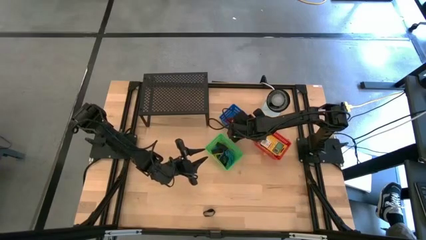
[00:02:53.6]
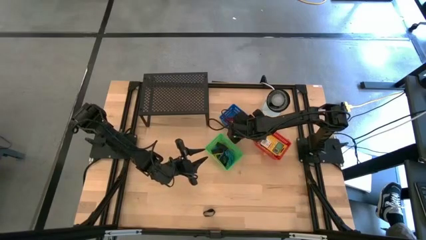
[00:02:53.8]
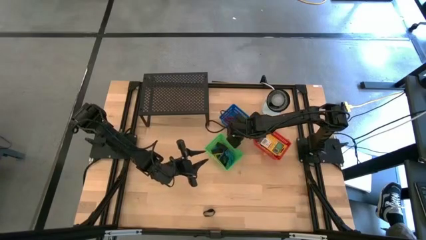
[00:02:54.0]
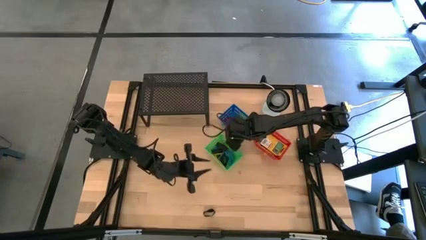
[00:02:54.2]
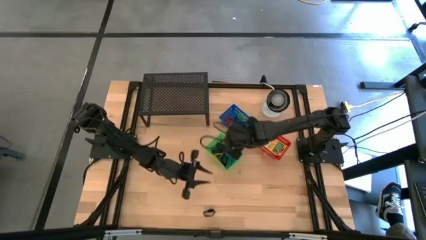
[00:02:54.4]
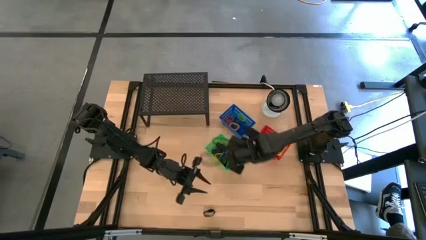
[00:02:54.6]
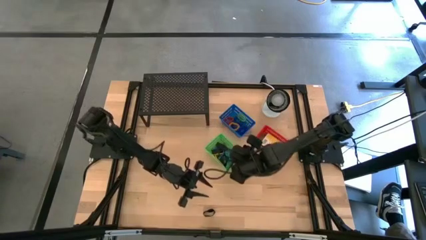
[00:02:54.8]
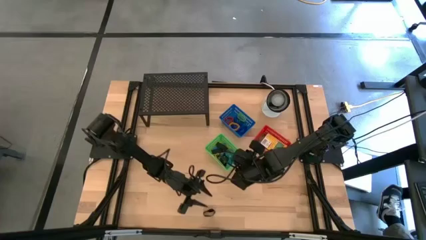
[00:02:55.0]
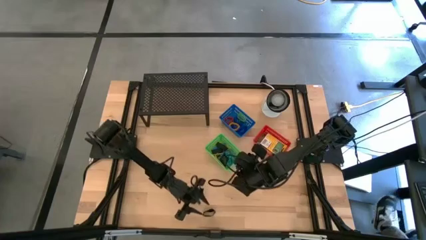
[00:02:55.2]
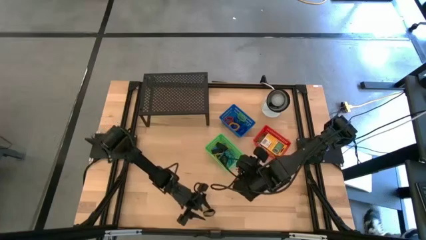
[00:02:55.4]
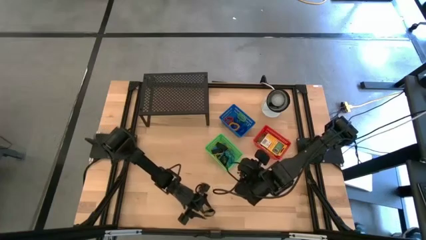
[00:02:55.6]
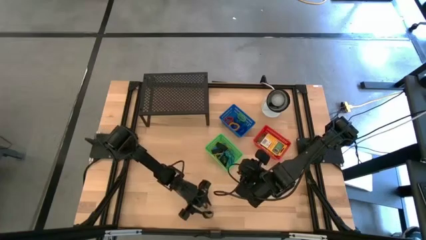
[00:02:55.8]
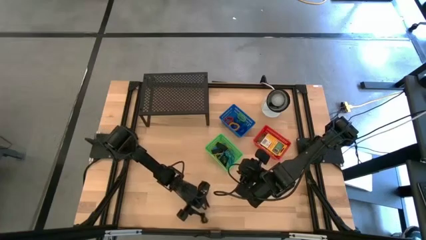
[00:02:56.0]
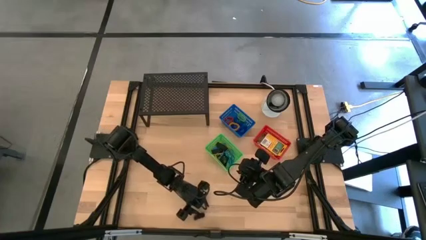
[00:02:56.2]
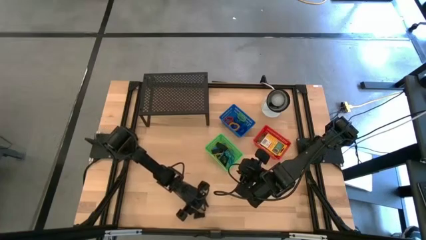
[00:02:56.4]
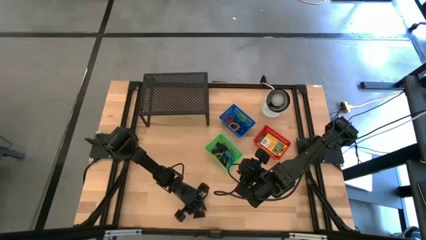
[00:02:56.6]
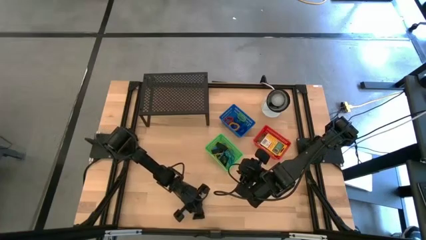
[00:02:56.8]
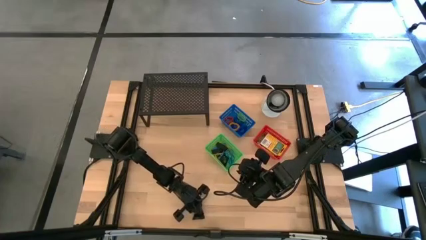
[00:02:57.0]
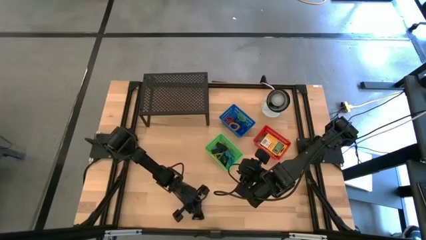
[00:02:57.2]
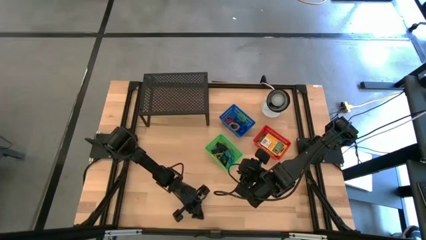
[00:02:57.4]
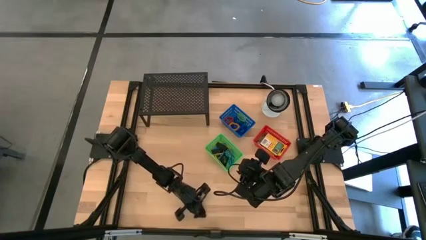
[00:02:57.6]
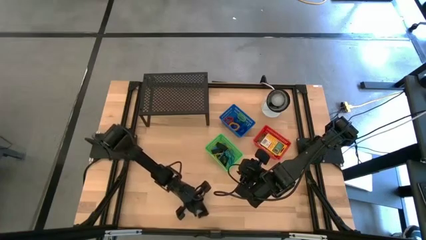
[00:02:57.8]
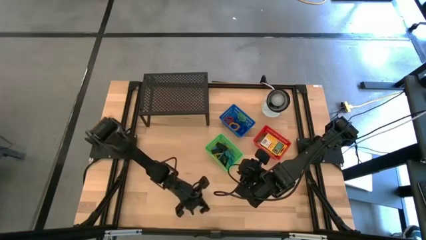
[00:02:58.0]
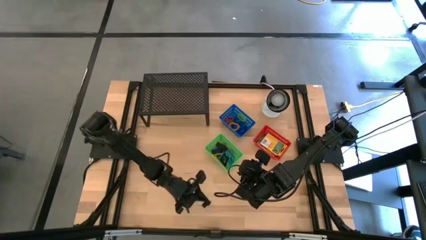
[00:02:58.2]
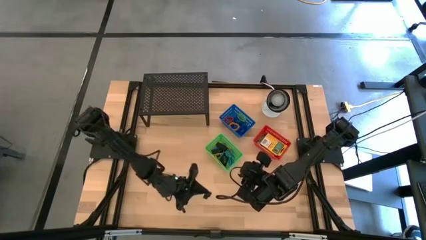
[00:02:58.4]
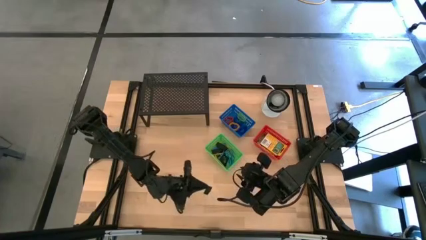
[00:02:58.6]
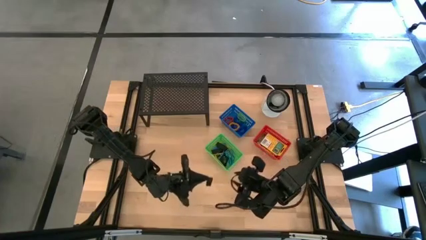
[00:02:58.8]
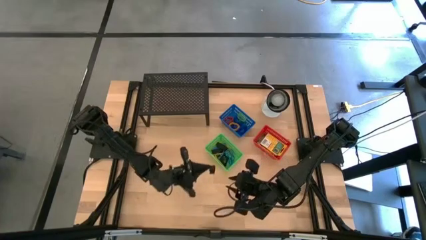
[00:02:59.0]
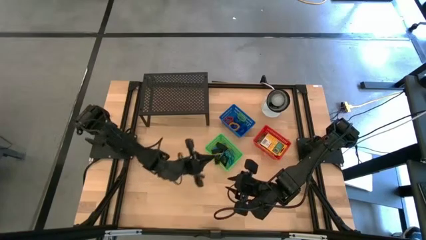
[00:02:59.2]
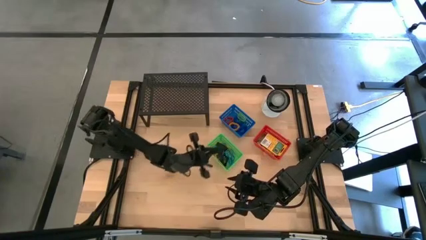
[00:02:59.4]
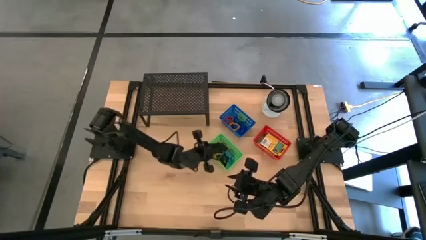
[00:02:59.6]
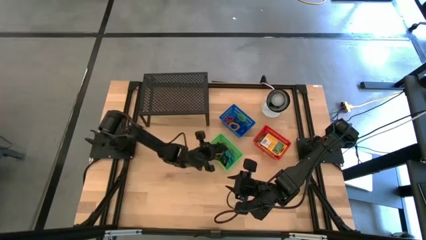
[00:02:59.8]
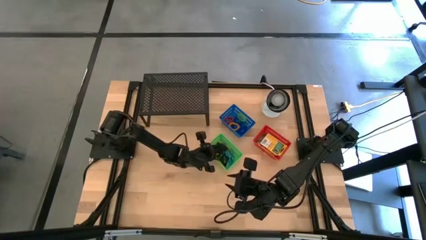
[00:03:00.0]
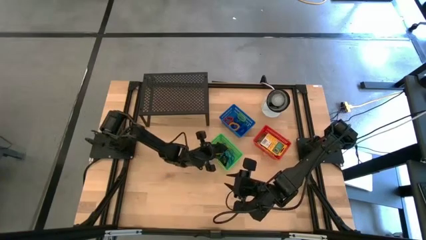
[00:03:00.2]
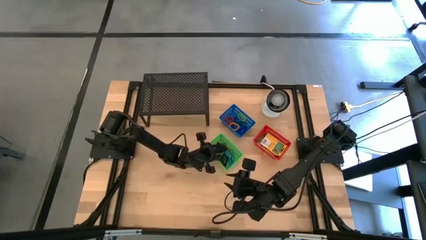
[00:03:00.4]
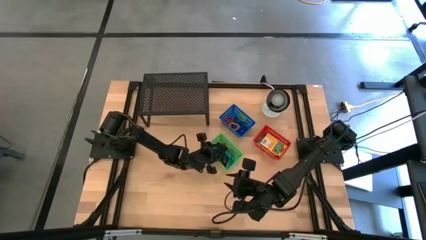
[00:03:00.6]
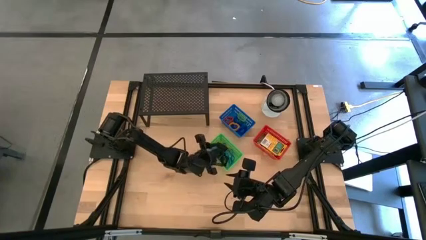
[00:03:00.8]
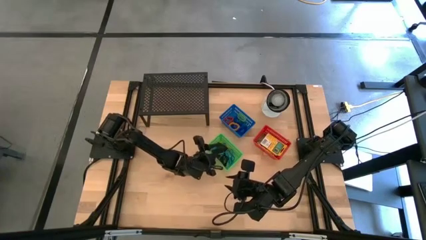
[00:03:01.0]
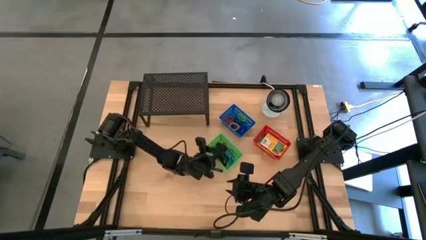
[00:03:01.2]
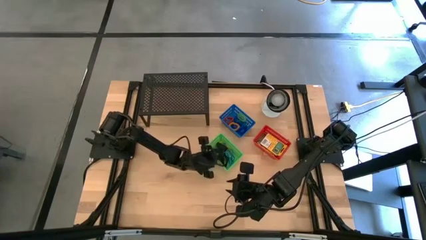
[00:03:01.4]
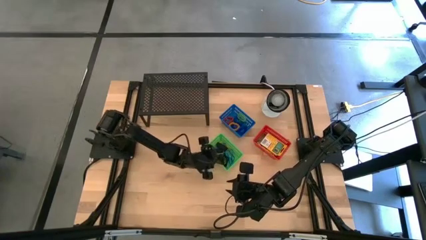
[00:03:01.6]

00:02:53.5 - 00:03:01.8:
Task: Pick & Place Office Desk Supplies
Put the black rubber band into the green basket

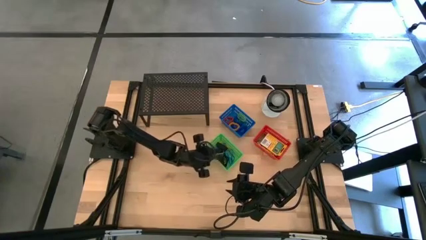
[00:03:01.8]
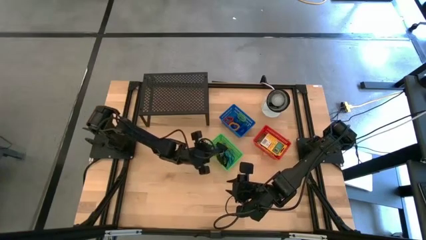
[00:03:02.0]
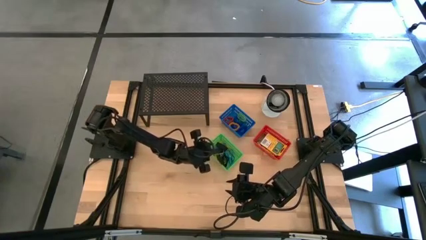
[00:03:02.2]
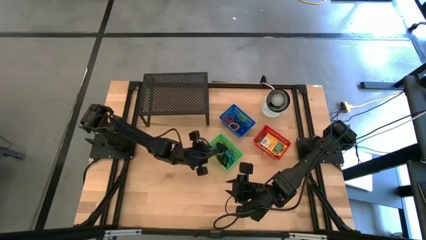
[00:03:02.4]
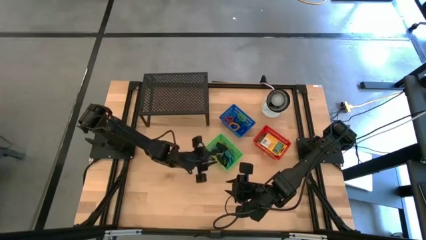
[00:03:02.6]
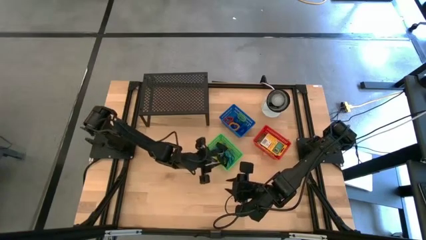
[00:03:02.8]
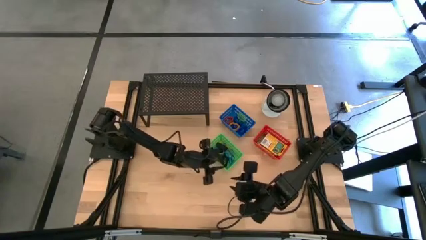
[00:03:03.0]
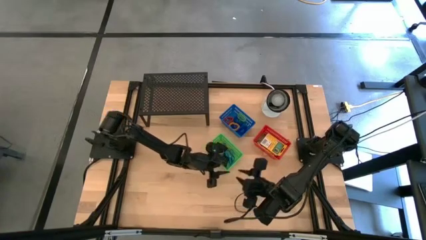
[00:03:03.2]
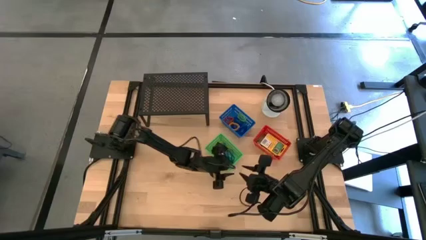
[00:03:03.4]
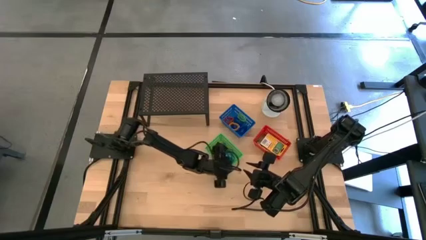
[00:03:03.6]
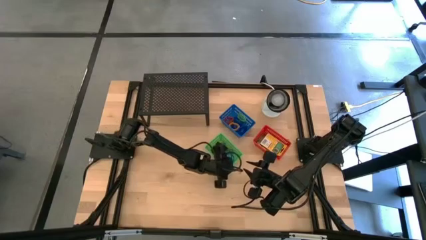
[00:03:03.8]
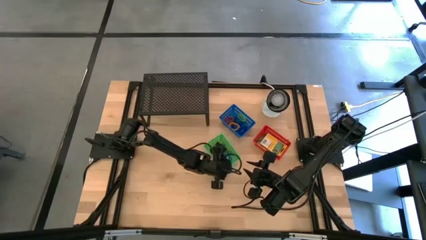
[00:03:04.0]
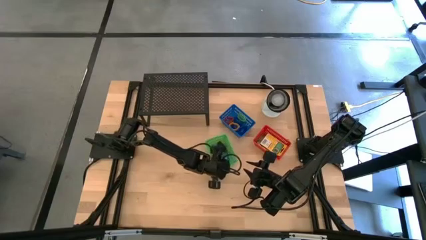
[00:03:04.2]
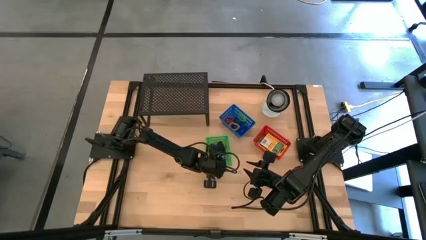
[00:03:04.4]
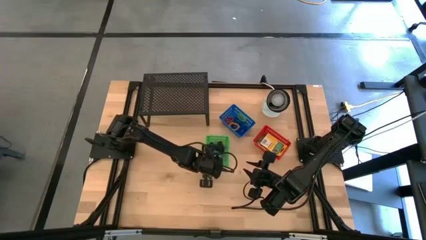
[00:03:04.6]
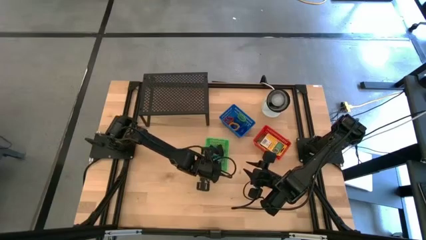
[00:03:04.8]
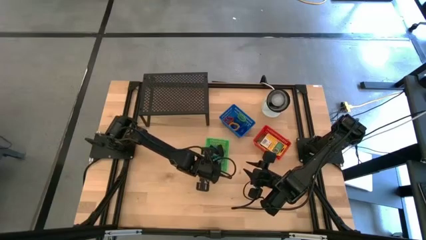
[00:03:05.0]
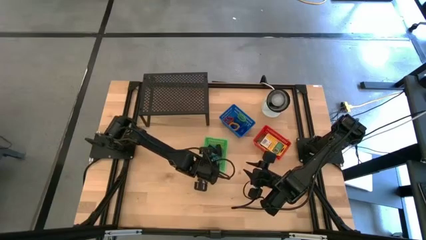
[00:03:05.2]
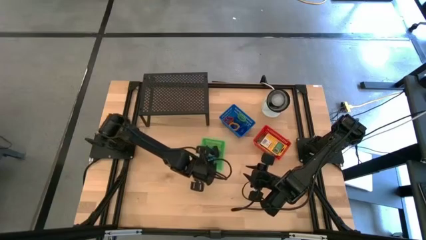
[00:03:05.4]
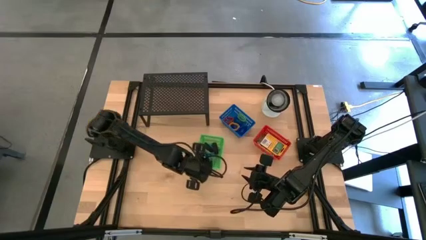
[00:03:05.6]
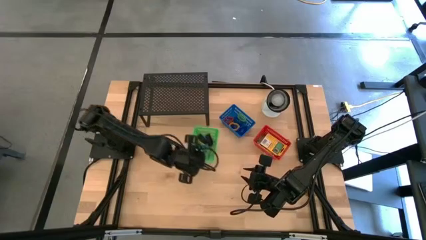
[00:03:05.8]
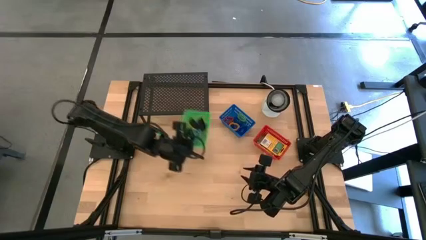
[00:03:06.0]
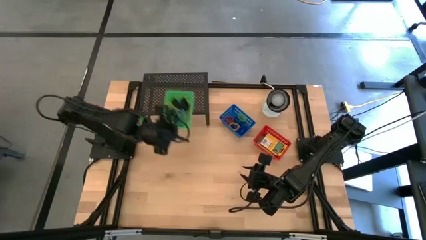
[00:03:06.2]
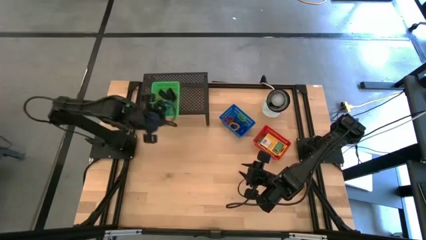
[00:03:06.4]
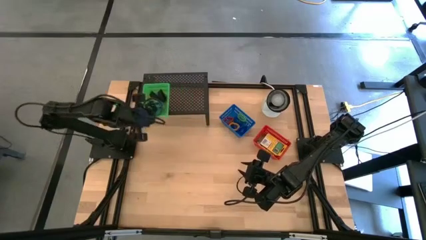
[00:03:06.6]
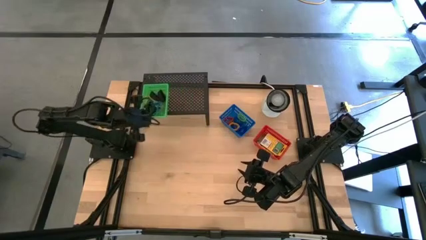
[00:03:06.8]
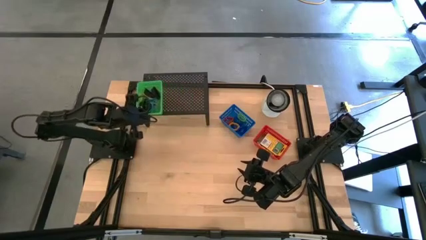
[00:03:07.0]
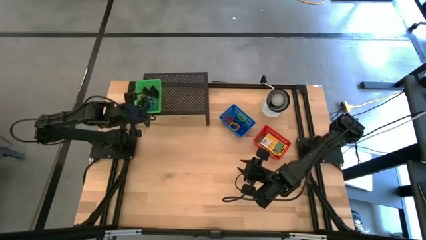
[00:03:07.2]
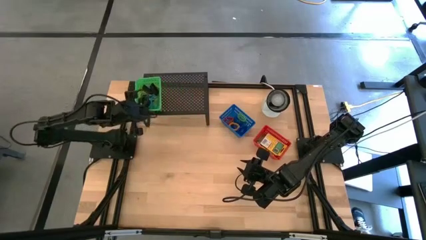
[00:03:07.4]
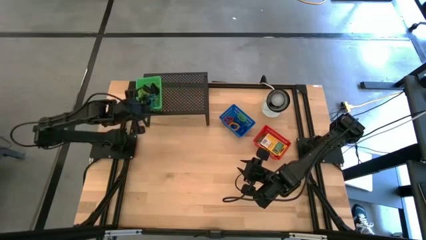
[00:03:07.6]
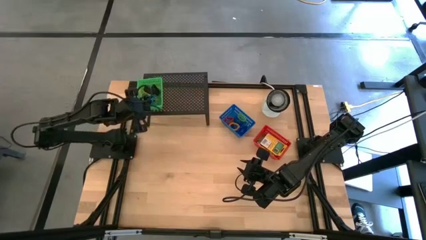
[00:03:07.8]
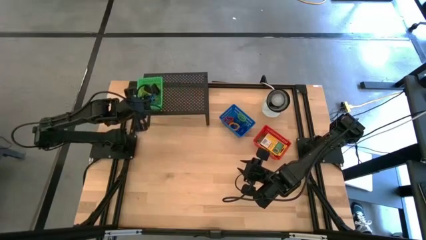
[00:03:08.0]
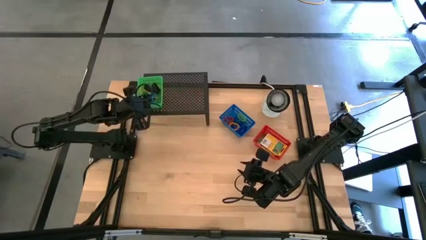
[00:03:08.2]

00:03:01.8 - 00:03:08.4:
Put the green basket on the shelf
